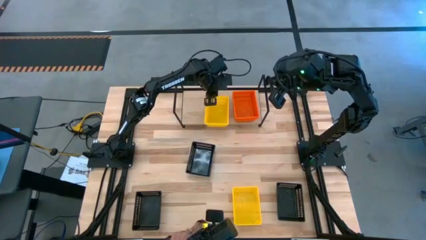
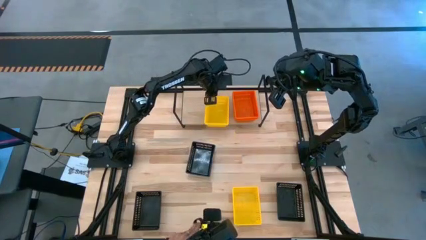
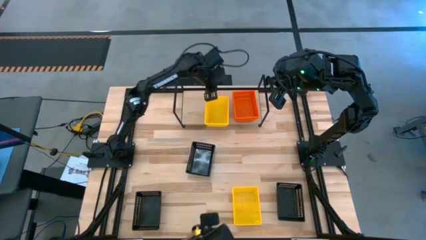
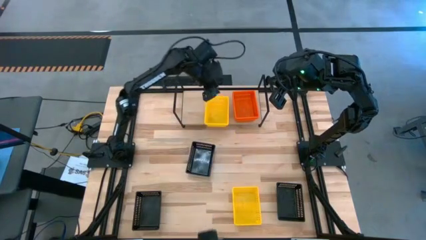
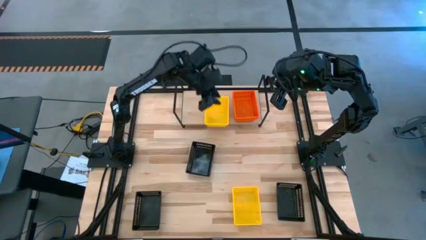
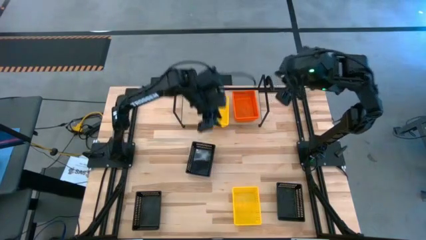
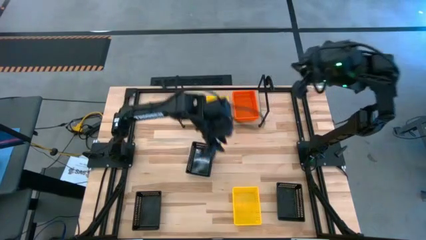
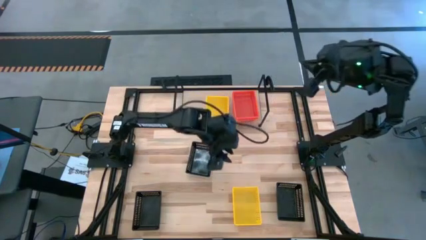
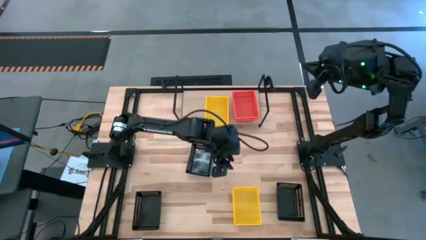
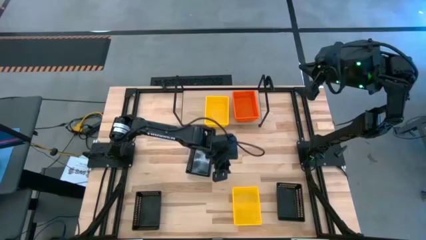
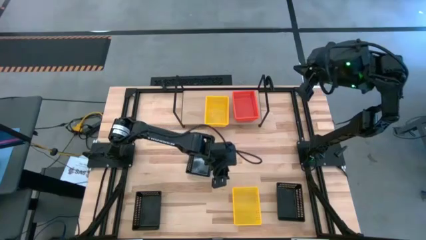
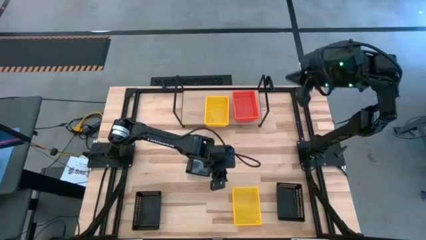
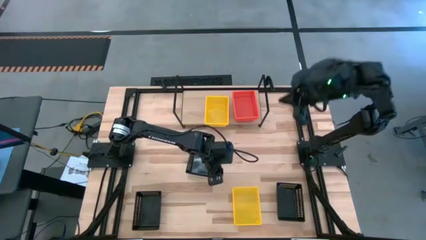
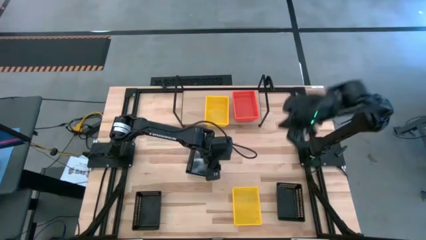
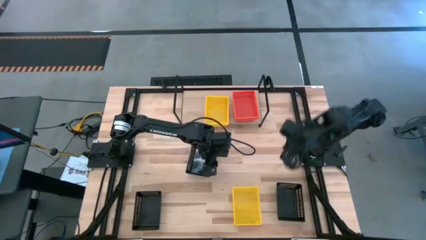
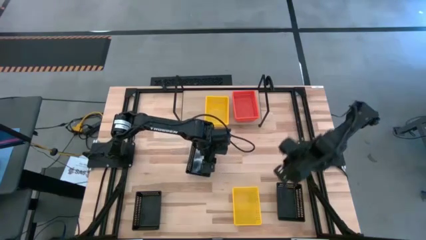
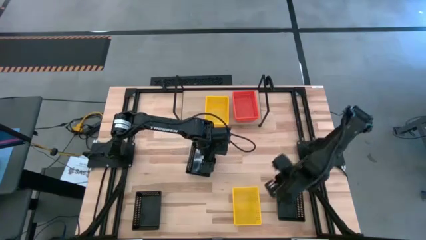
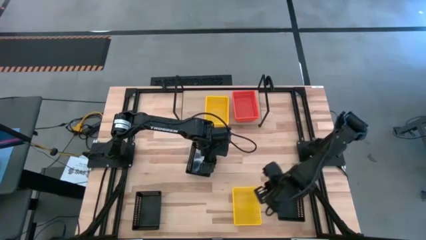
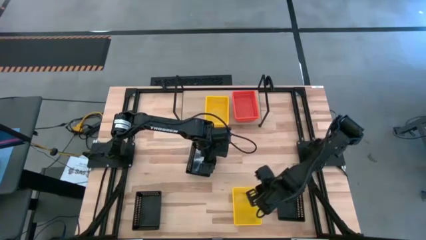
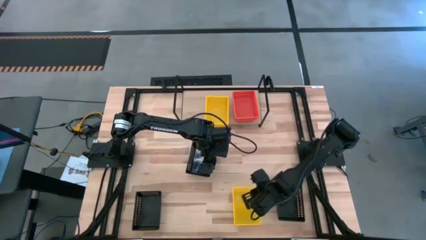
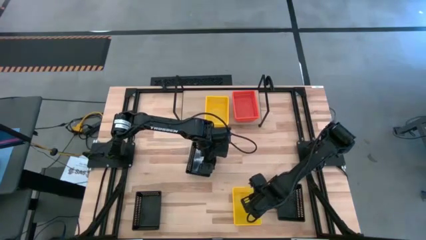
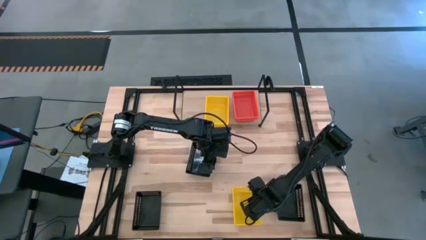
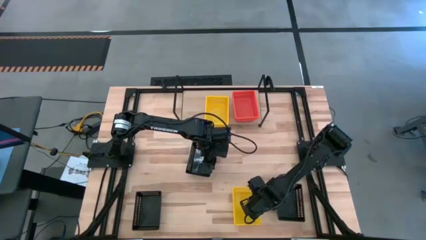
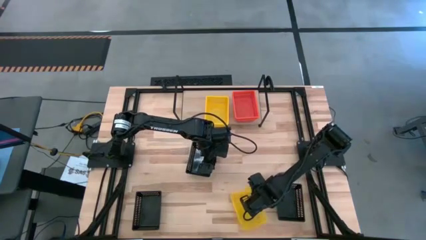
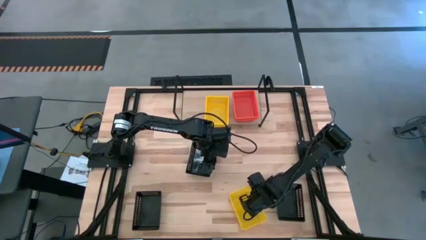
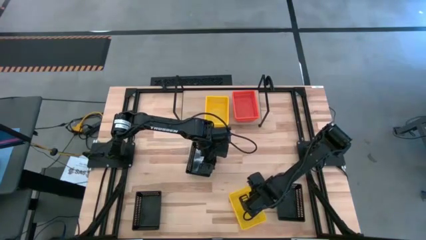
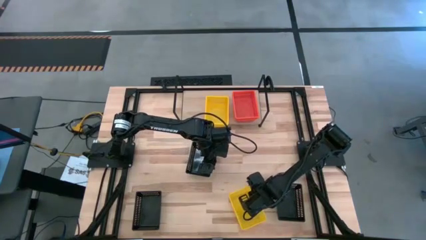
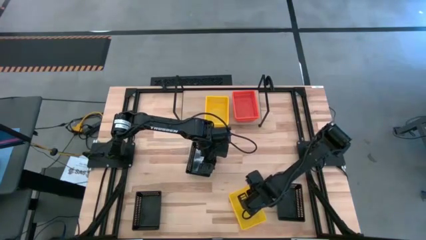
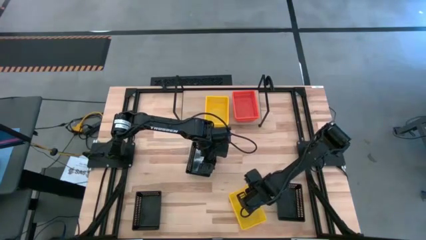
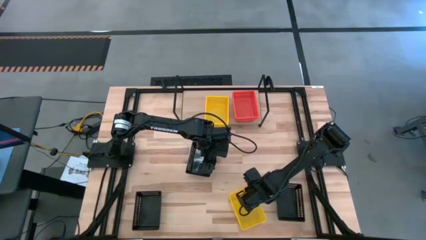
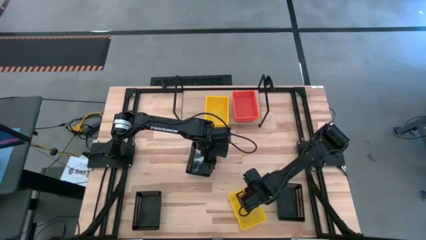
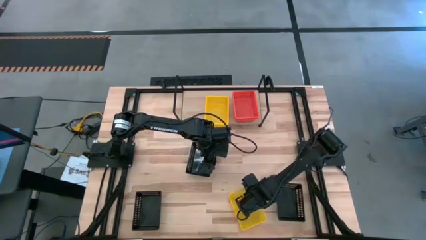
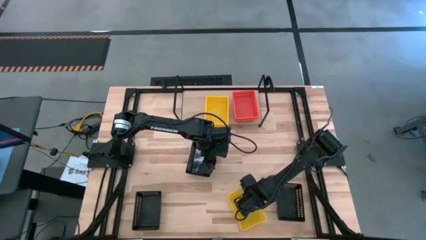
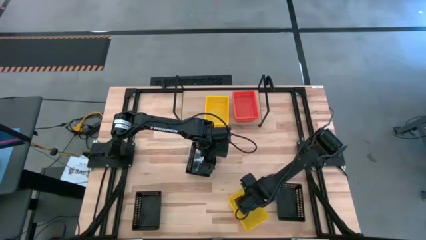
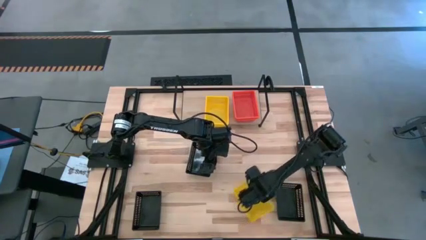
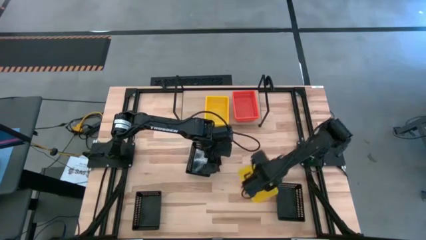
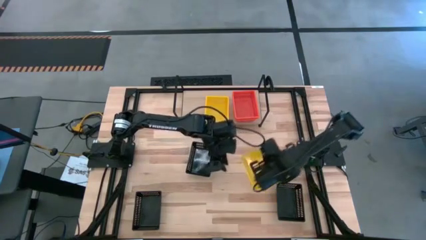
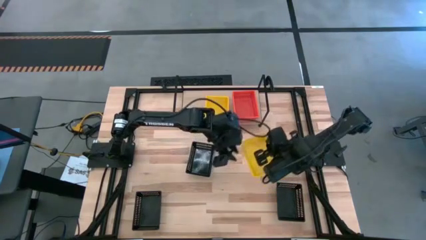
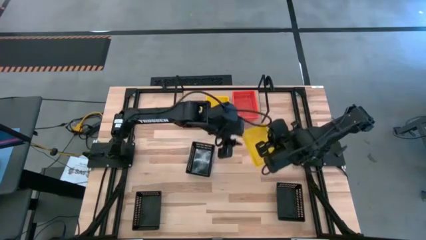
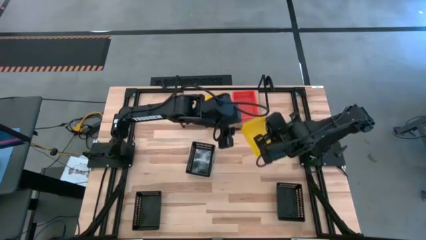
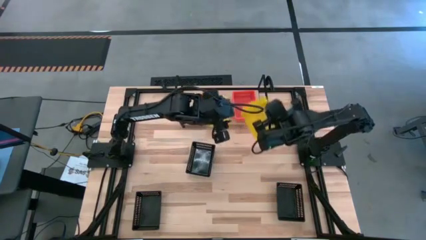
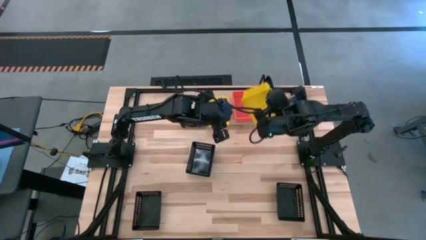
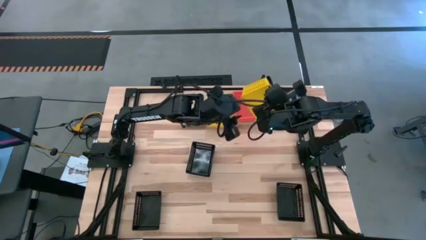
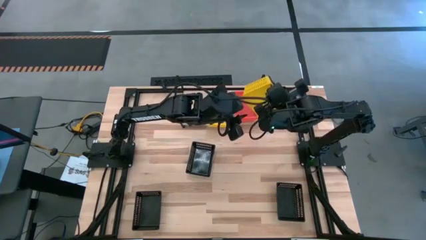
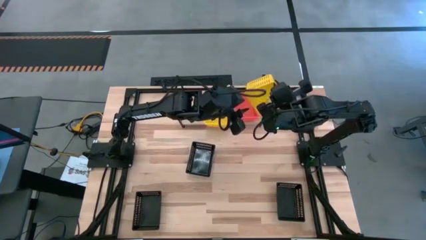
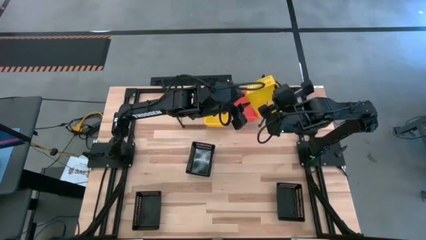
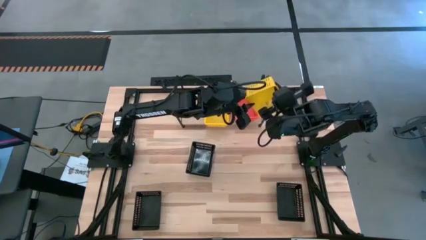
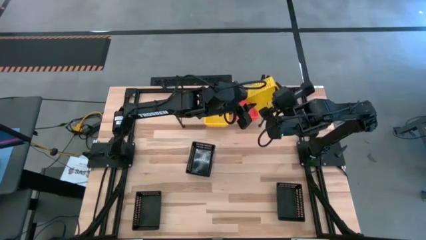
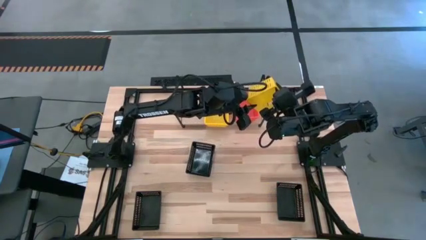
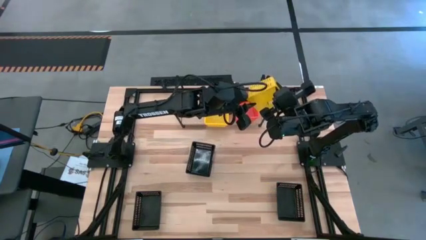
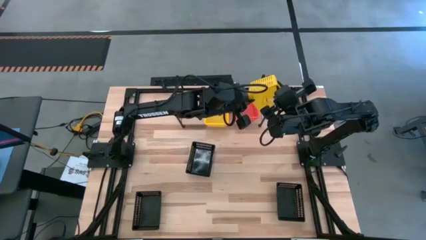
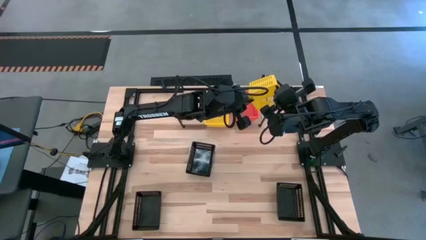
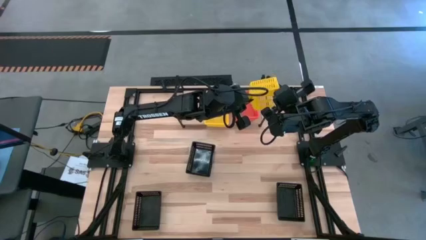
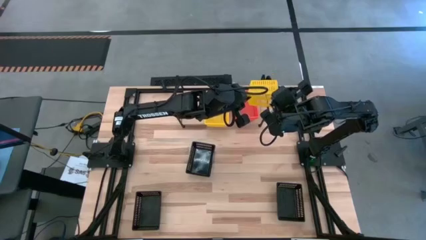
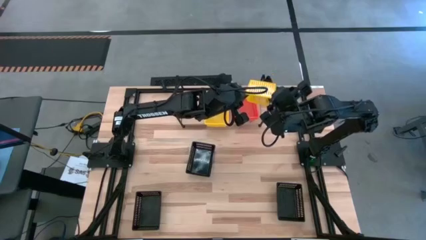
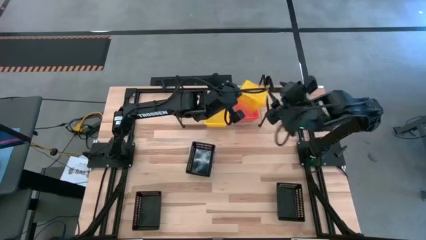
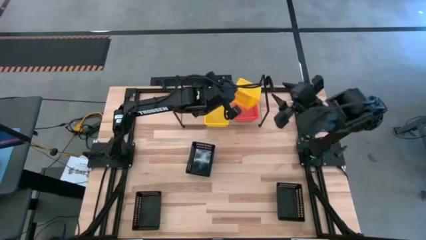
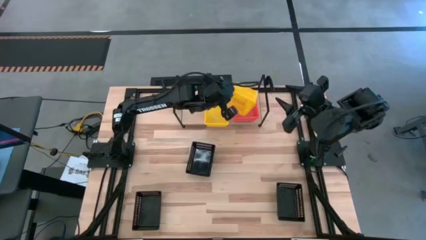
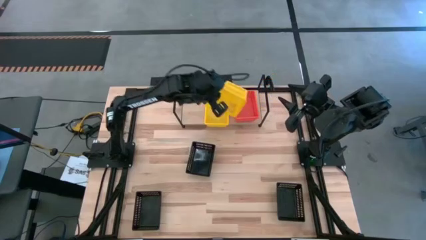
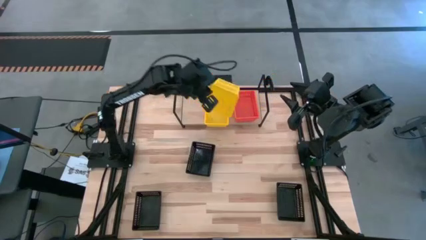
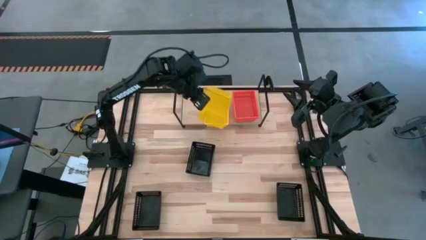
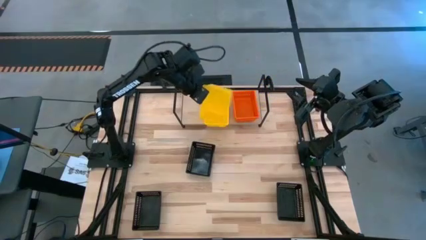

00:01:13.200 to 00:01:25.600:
Task: Stack baskets on shelf by color
Stack the yellow bin on top of the other stacked yellow bins on the shelf
